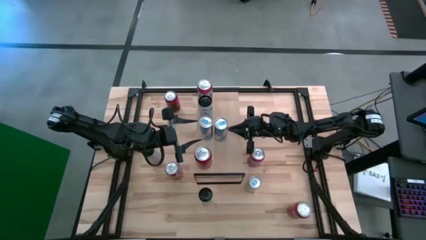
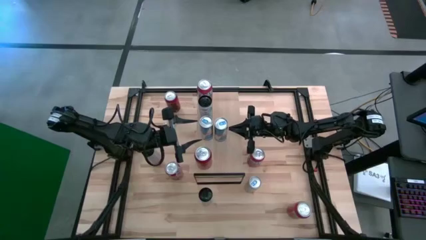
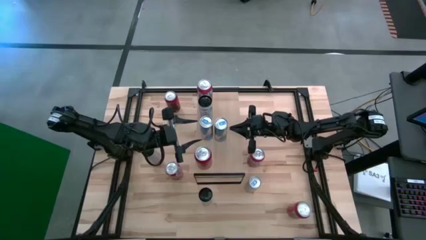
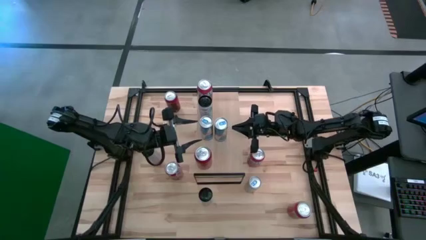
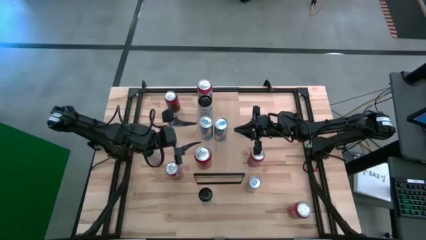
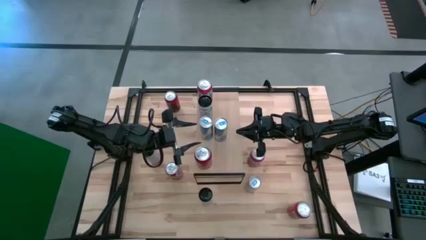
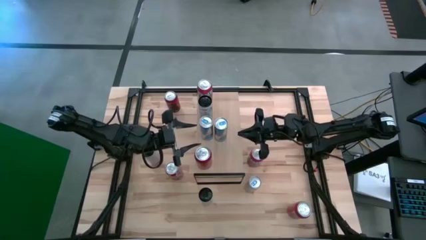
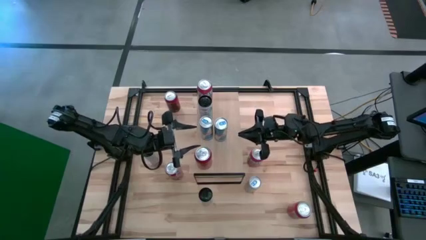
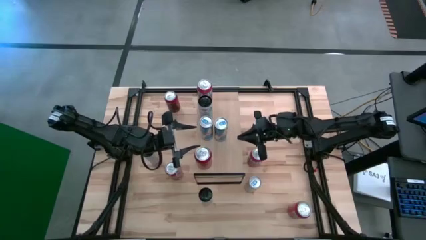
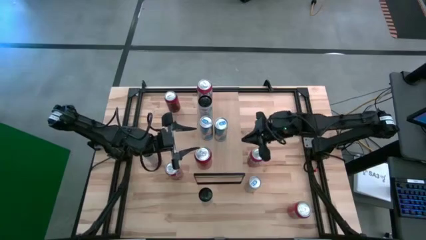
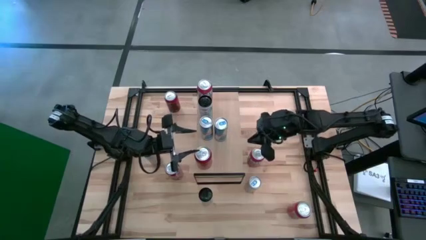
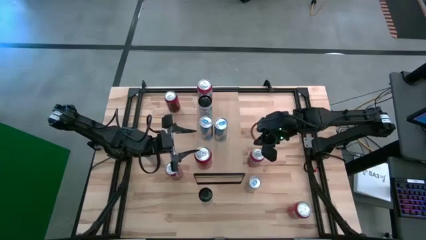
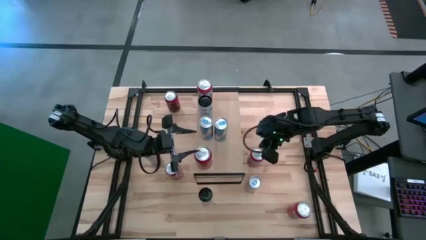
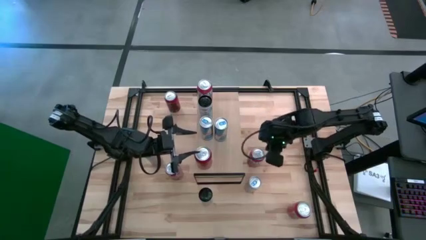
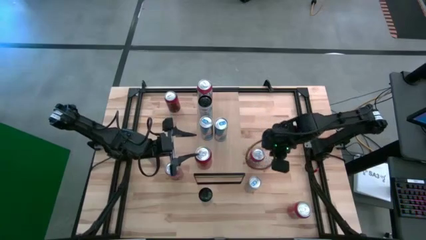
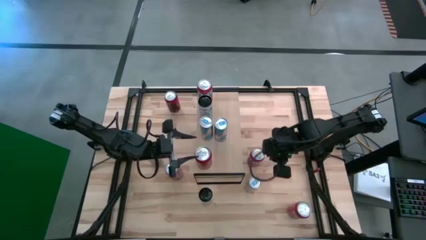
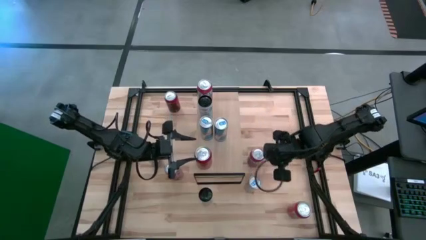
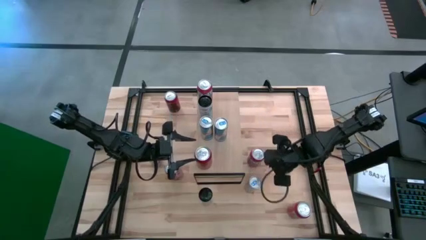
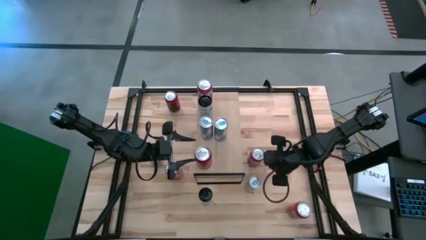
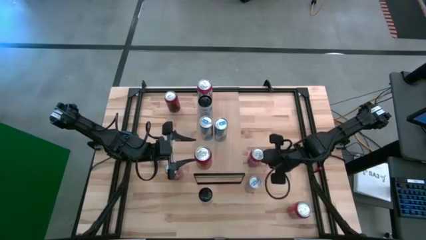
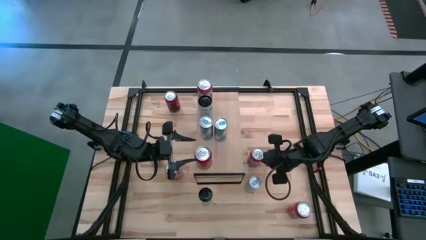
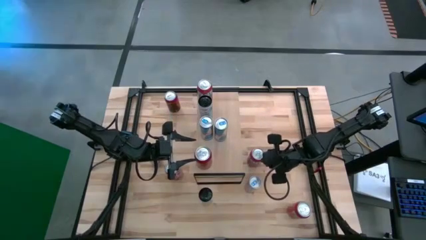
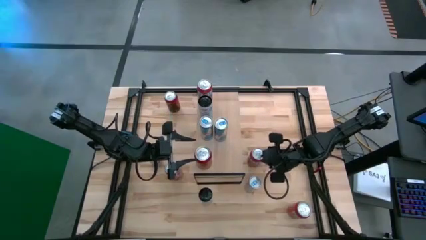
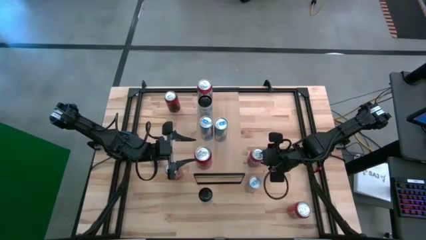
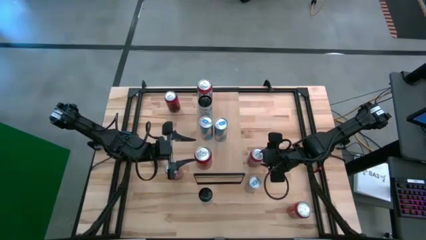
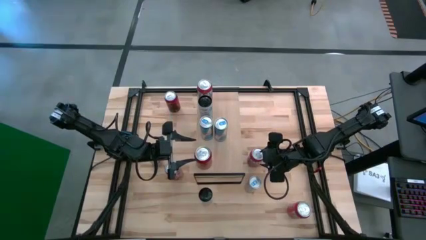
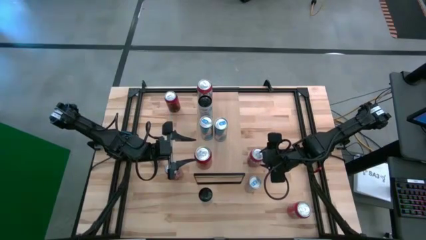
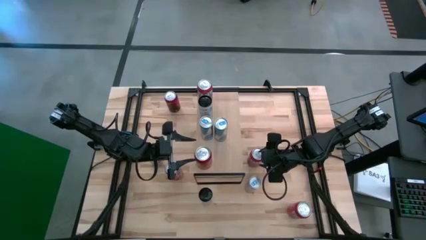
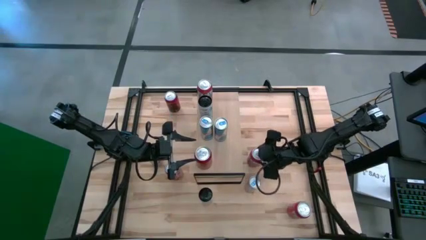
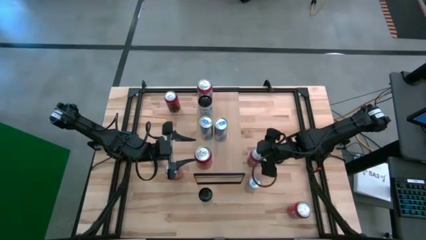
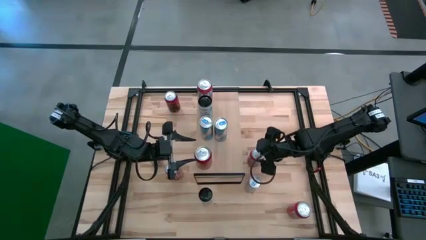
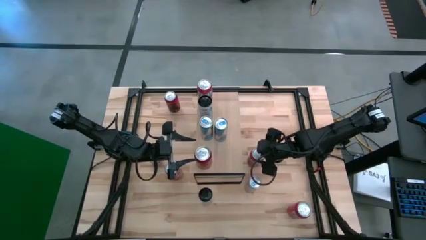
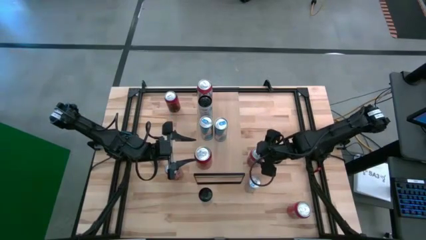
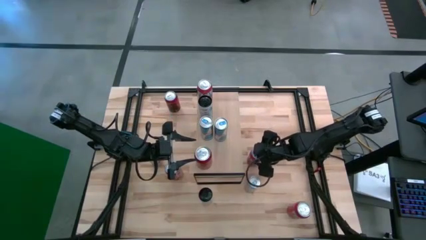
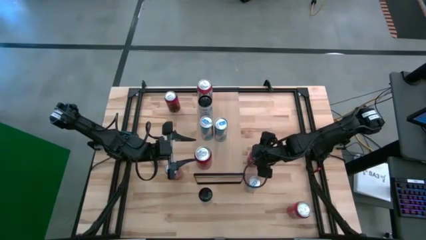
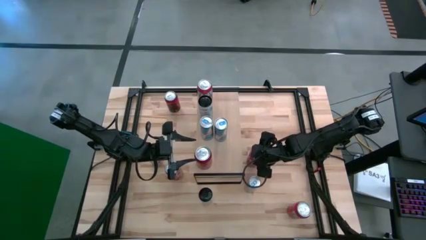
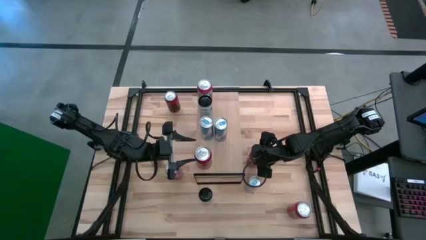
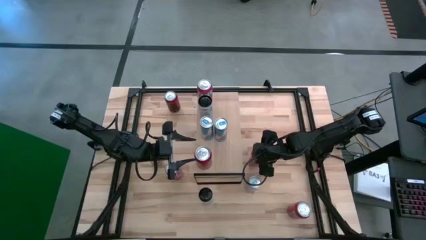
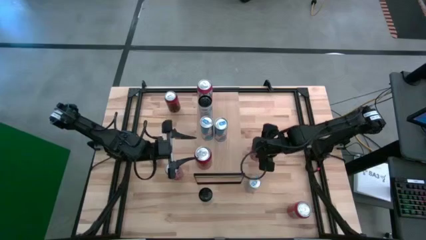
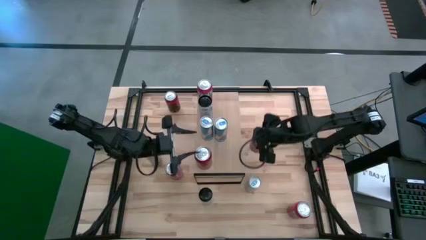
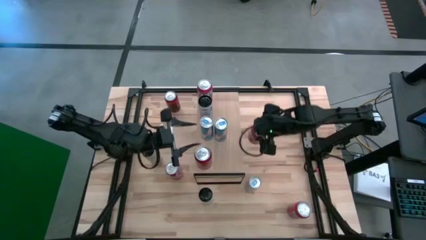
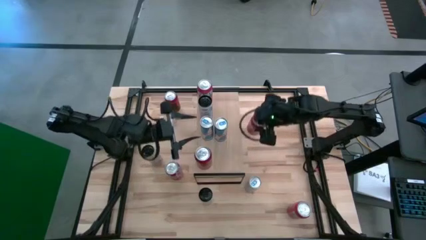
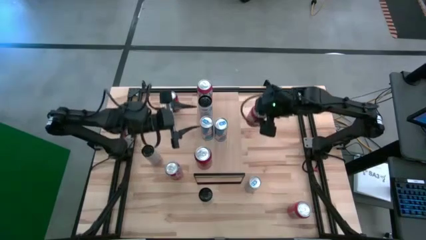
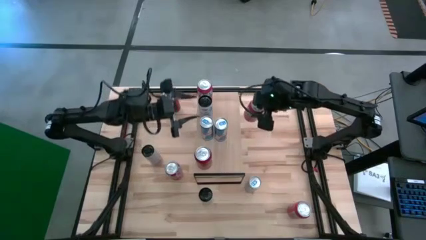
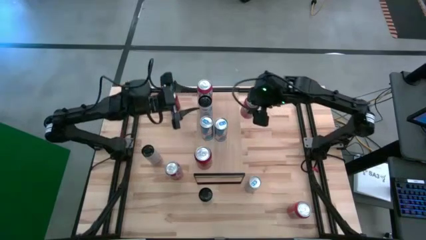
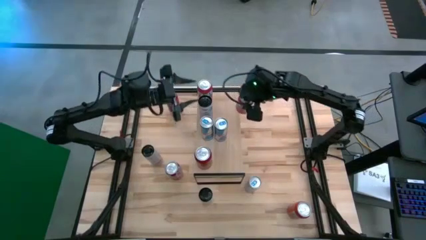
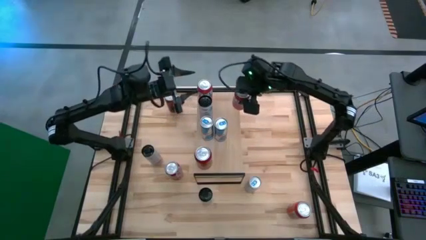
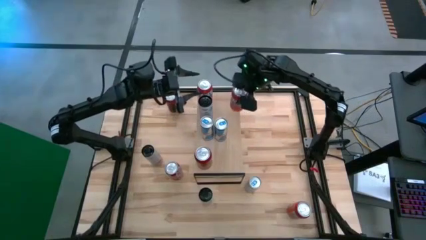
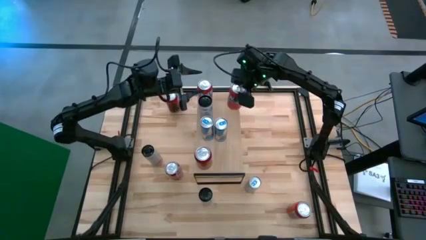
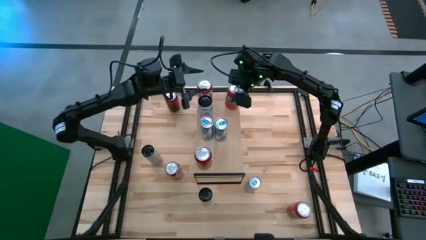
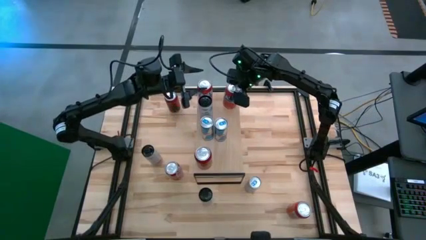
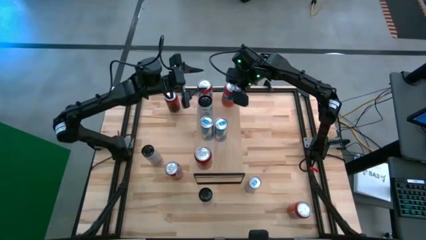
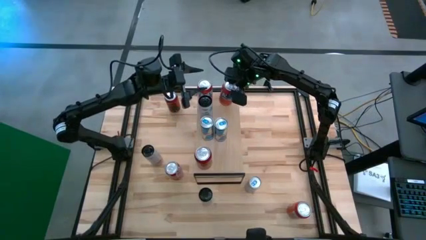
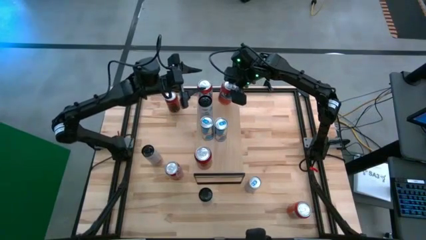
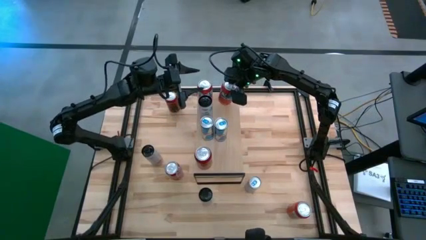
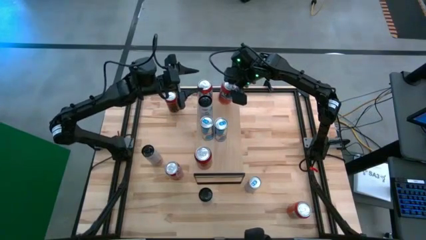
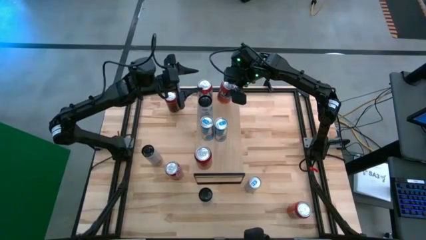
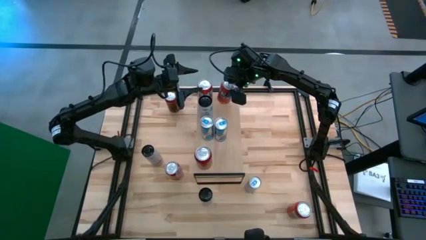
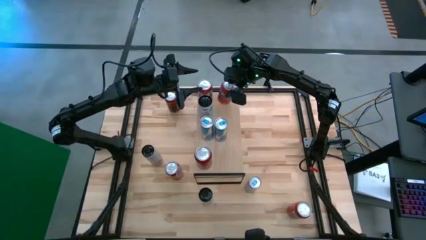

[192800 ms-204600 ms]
Task: Place canned beverage on shelf
Put the orange soda can on the shelf aligned with the other orange soda can
